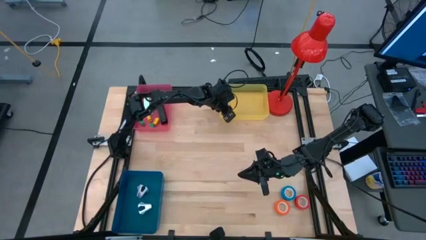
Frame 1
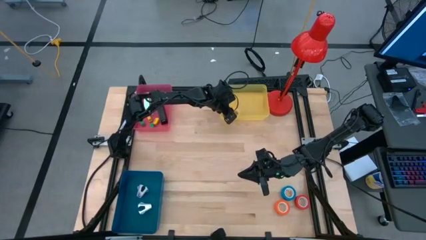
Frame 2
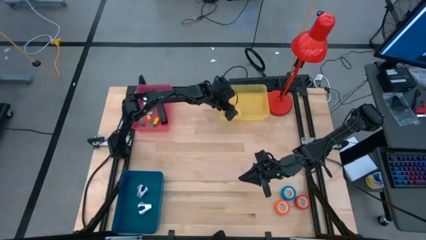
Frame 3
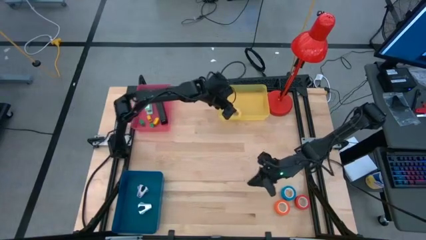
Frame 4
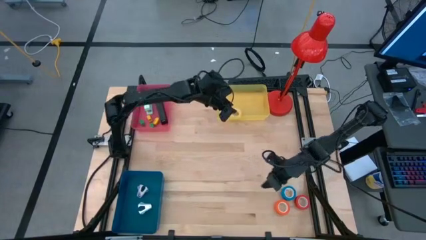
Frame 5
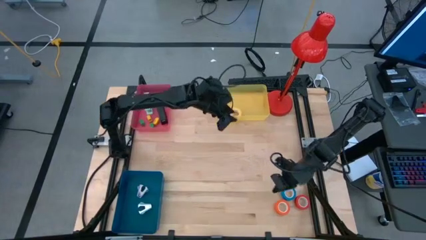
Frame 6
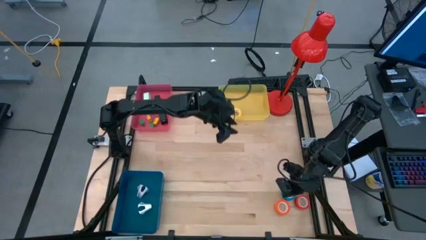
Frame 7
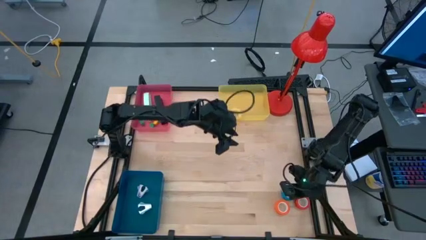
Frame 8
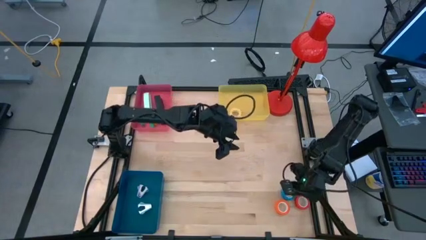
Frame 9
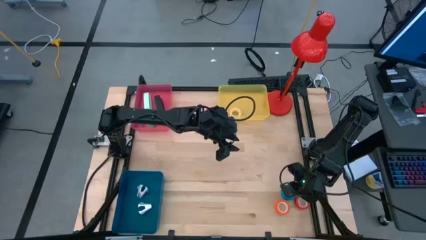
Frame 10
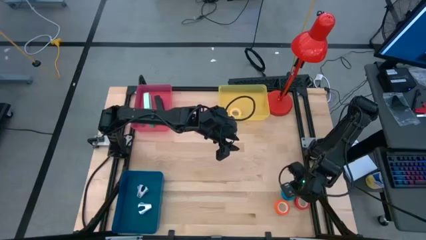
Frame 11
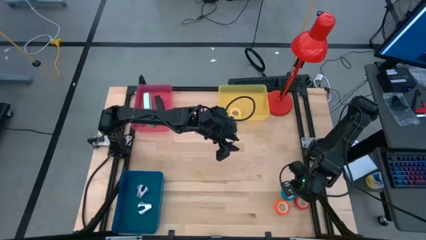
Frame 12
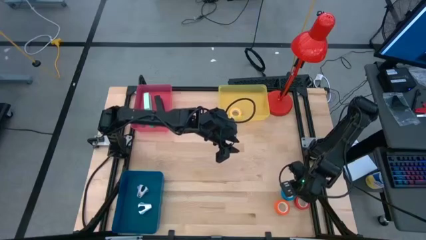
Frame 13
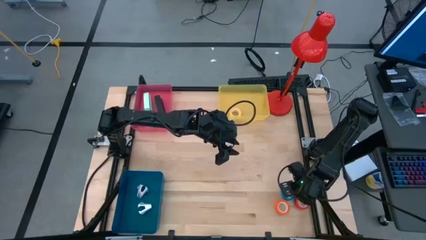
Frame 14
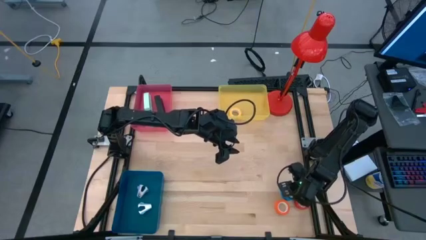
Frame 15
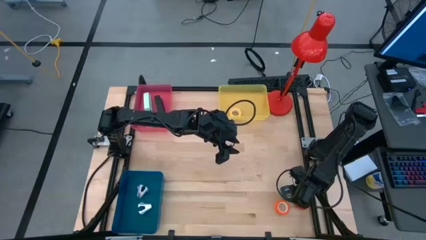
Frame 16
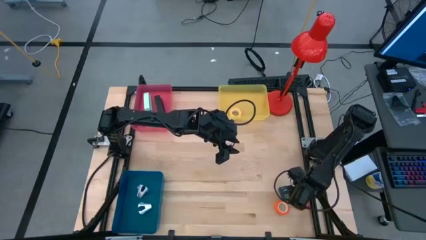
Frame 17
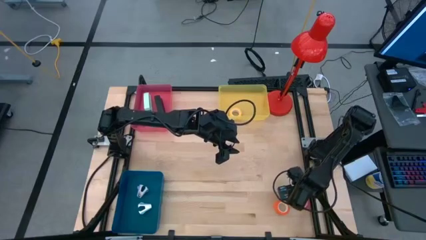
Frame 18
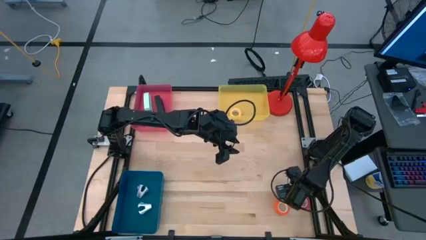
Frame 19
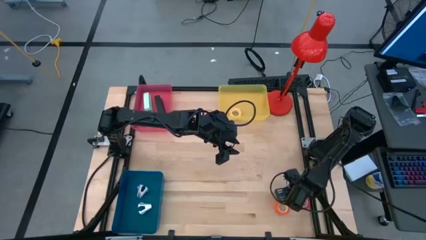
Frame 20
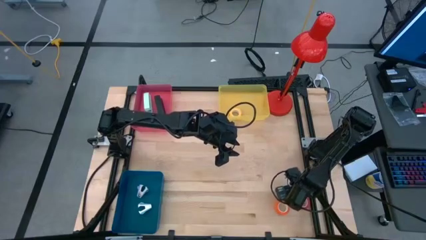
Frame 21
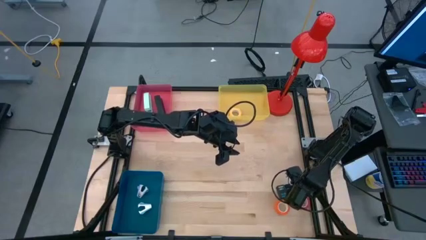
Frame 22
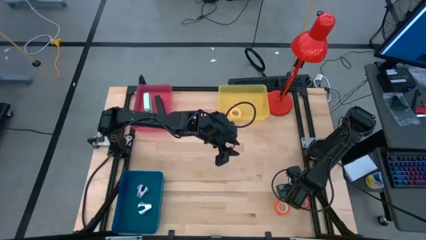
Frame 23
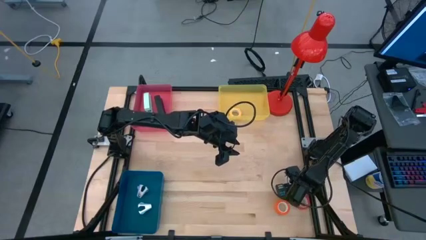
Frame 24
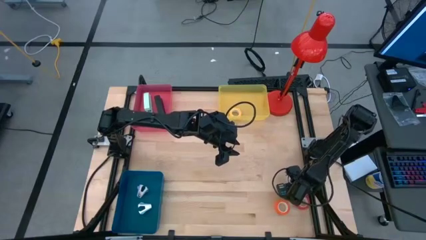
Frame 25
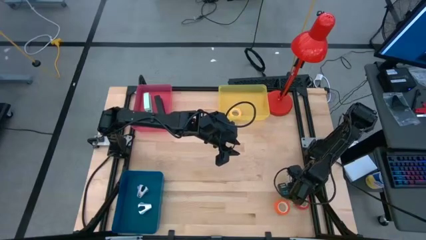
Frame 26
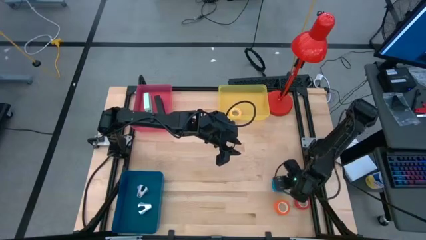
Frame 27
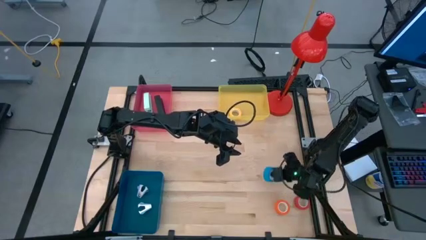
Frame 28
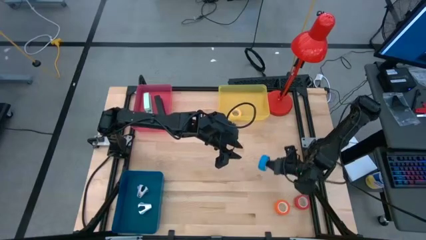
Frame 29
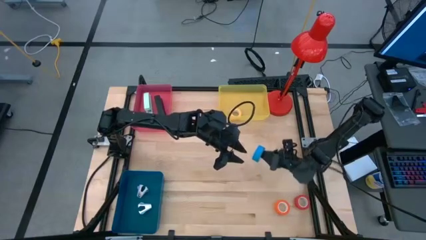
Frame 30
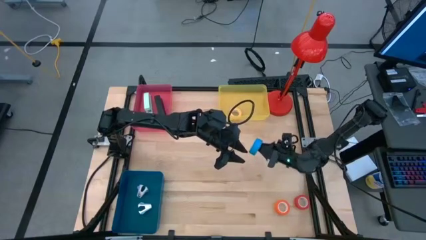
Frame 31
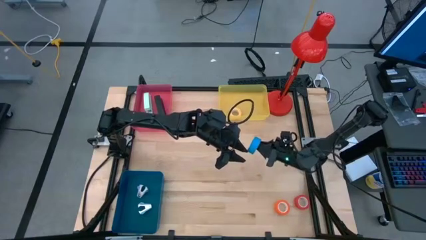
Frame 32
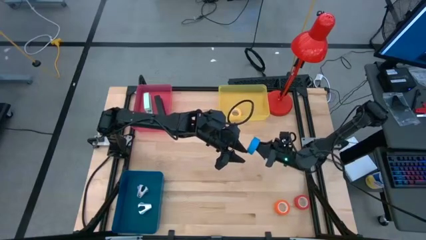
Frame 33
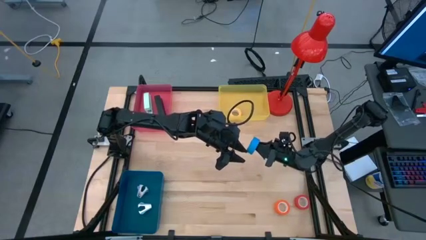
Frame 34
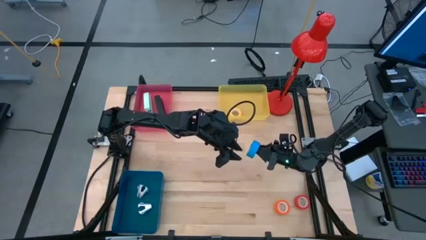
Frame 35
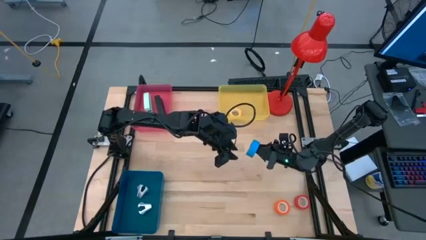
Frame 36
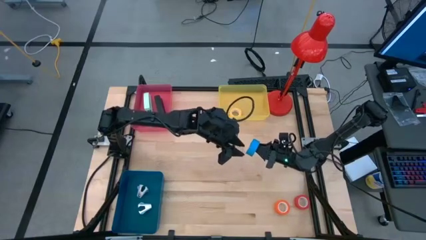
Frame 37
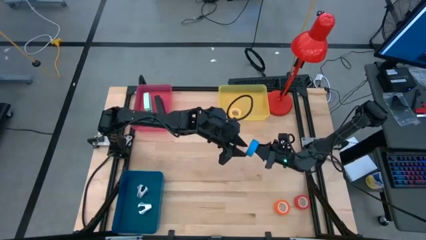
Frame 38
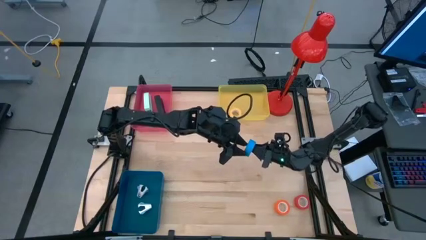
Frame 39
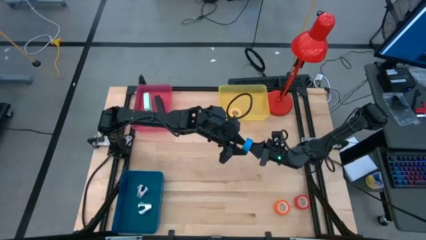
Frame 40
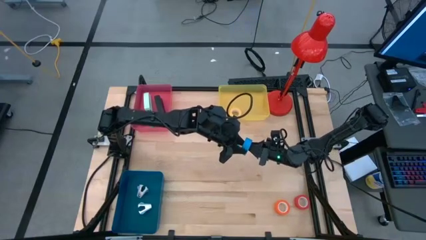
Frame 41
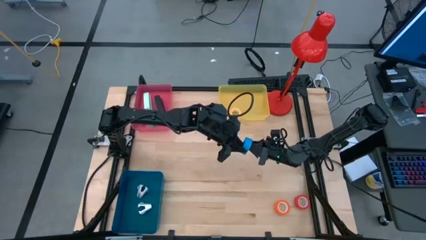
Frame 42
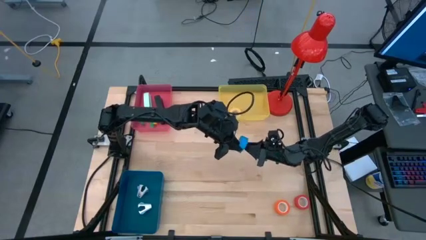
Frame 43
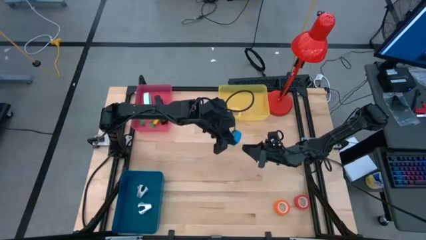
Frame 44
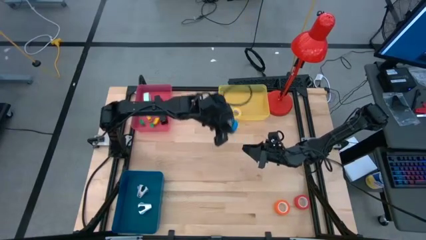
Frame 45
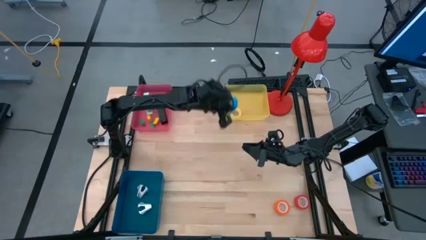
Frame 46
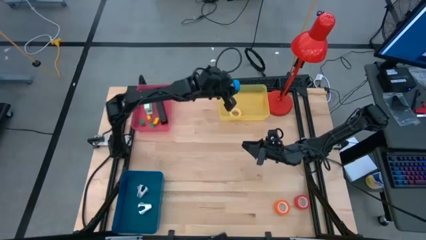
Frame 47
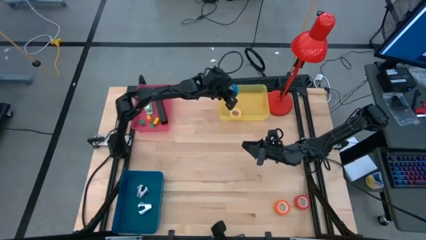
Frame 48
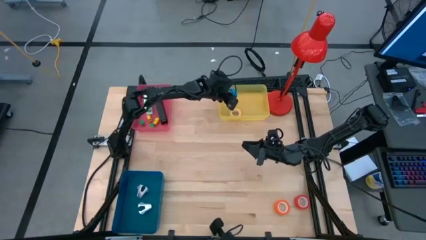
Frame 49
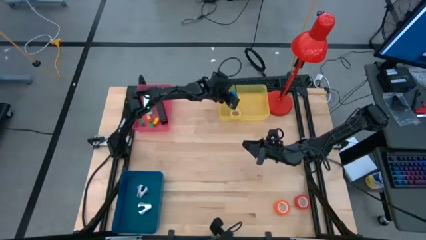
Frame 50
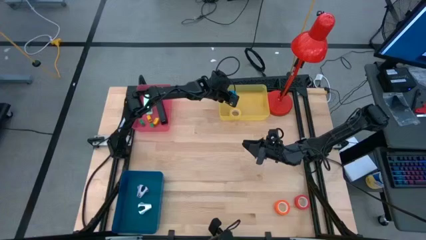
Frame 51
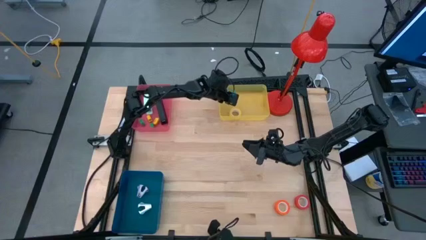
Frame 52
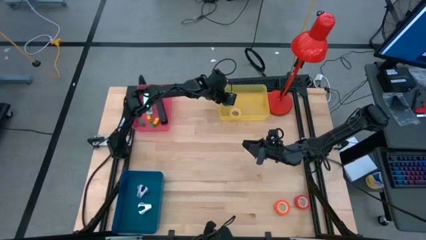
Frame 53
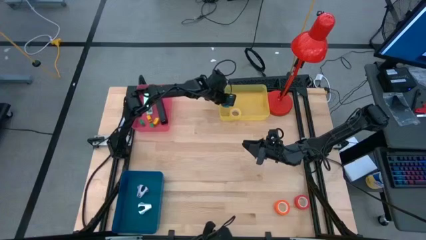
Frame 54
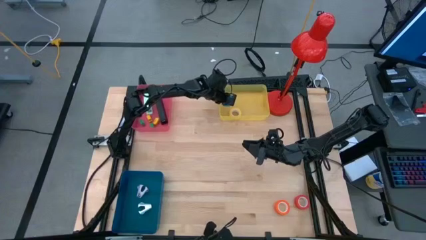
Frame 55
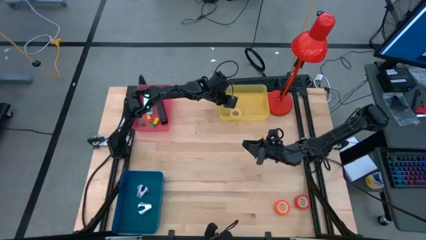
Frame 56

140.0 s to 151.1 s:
Task: Pick and place Stapler, Stapler remover, tape
Put the blue tape into the yellow bin

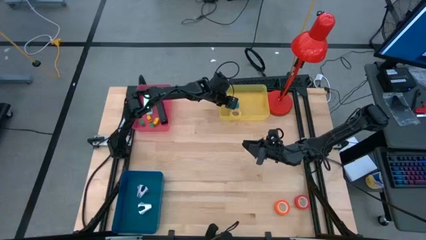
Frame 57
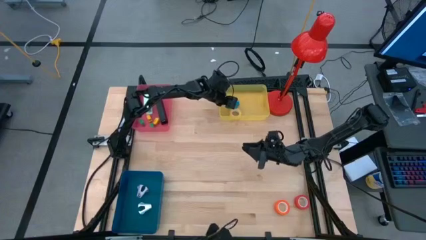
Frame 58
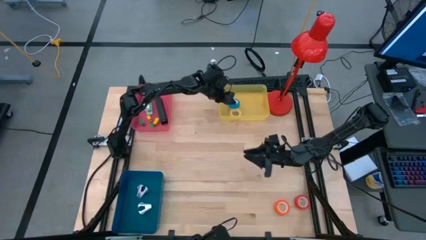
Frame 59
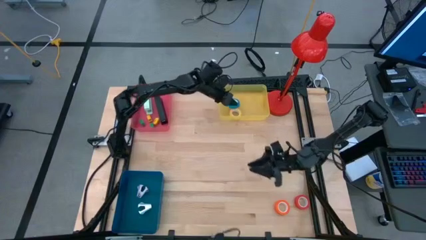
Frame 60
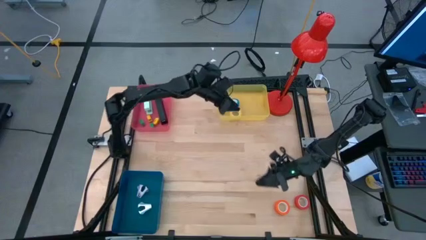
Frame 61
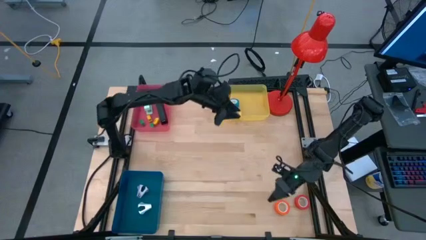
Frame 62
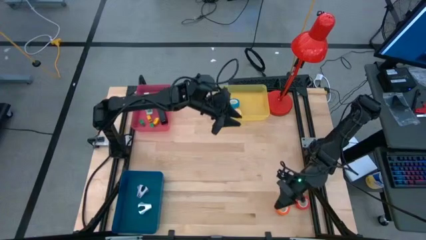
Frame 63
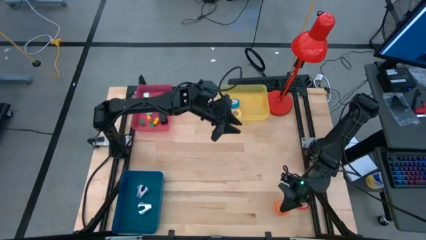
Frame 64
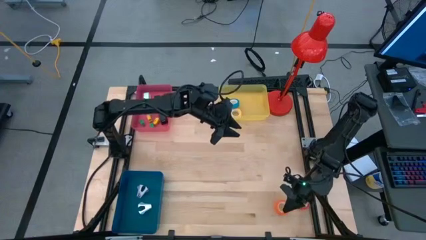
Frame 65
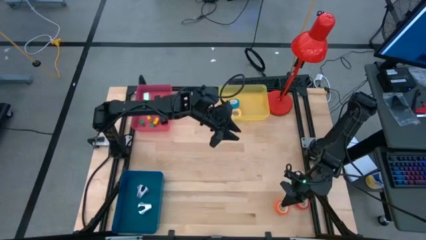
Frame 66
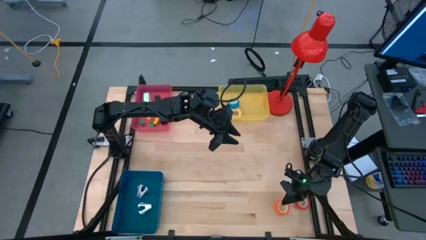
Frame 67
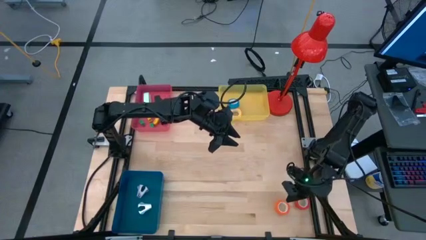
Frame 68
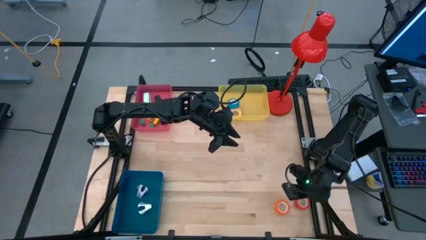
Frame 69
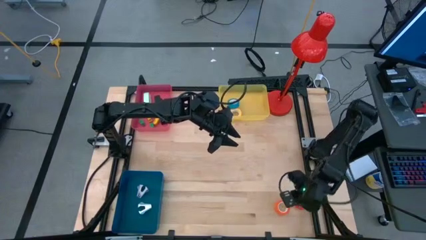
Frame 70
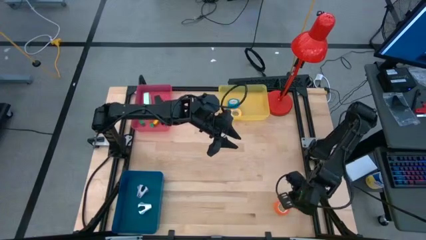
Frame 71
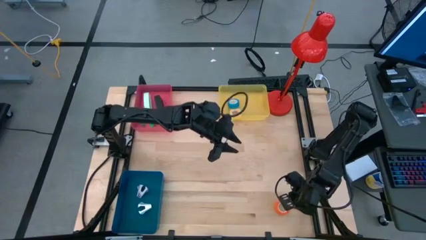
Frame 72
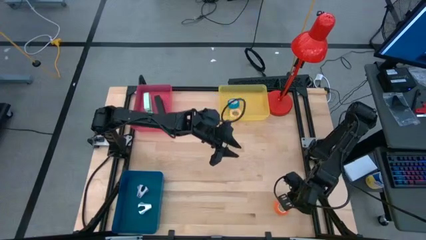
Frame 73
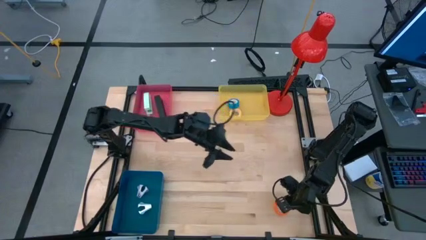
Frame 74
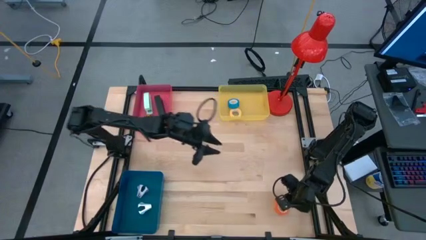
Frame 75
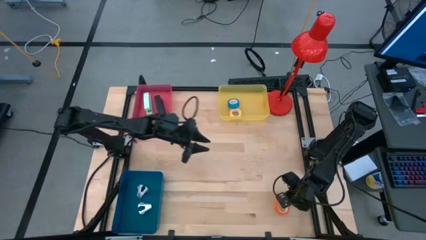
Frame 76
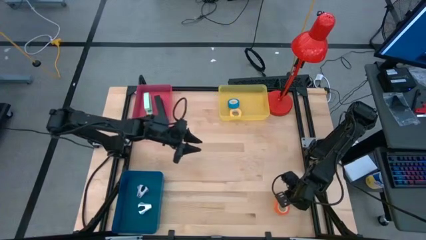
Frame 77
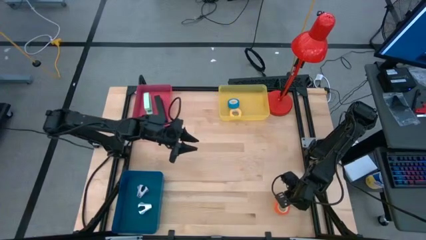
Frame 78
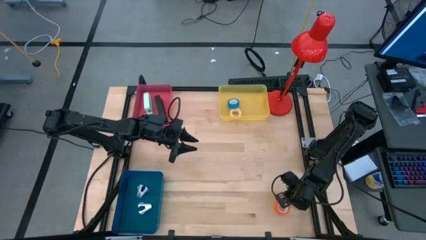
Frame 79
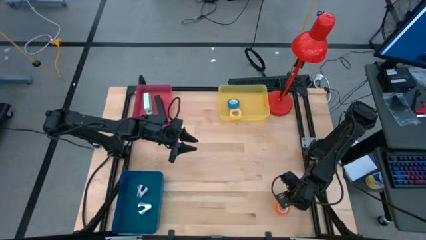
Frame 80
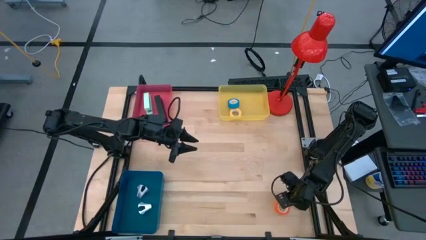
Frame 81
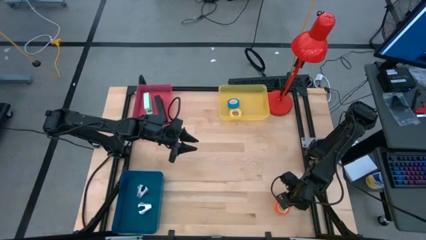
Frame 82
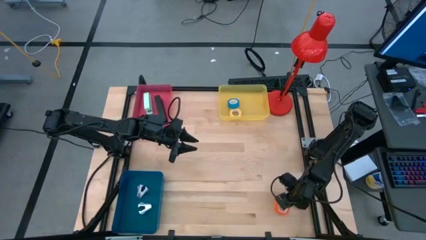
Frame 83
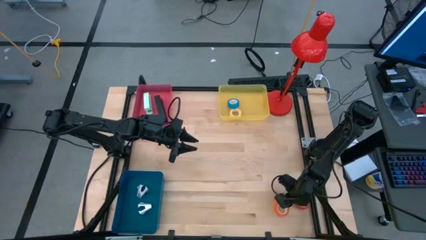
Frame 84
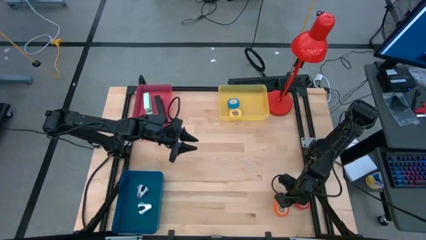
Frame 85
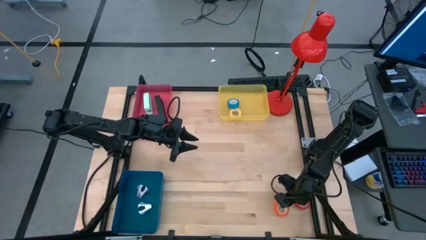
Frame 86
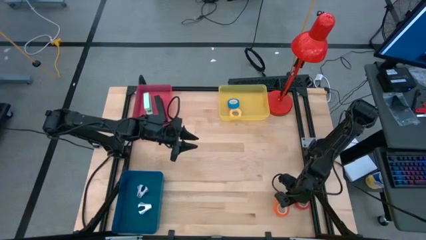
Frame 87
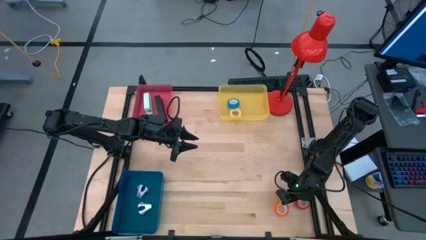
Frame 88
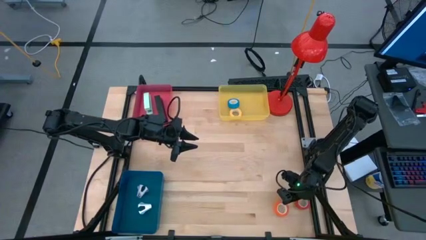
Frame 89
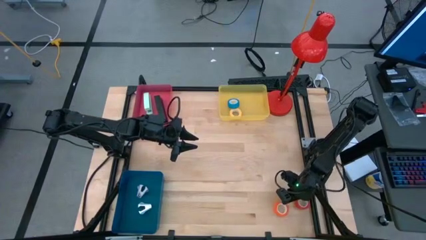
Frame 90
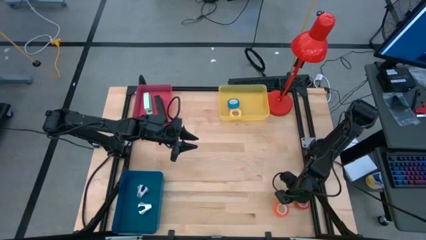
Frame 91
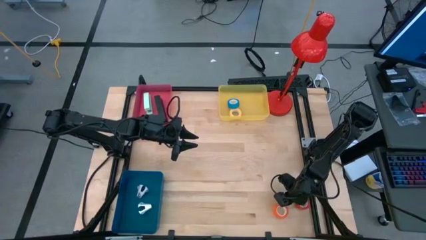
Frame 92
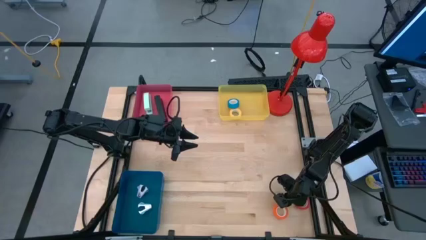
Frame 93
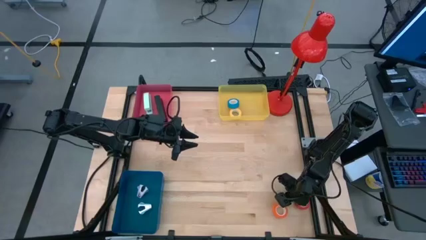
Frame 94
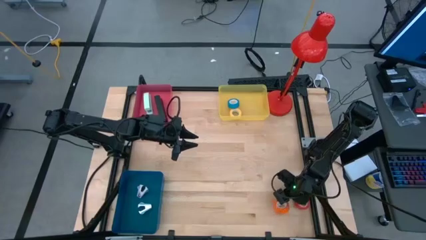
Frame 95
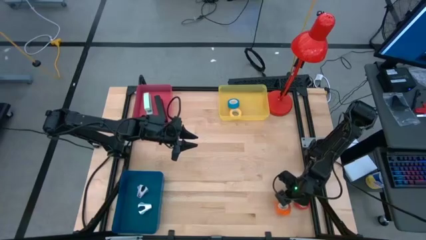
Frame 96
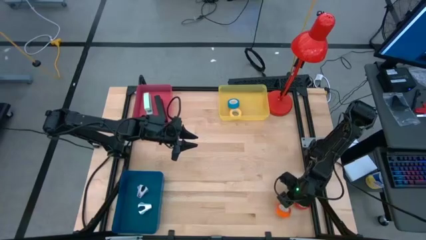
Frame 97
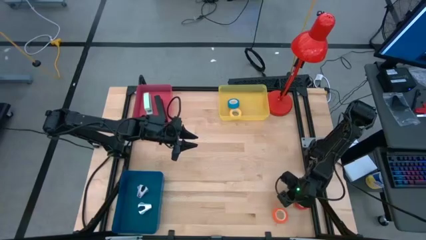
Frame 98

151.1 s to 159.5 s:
Put the orange tape into the yellow bin
